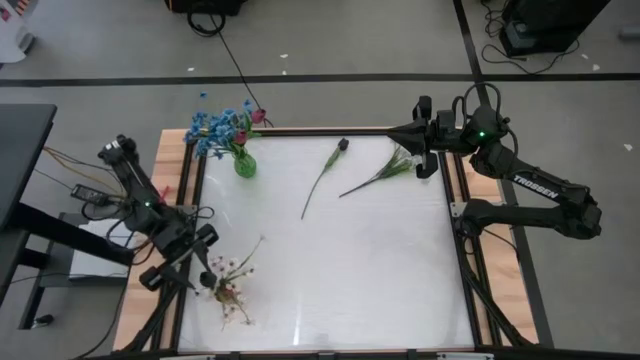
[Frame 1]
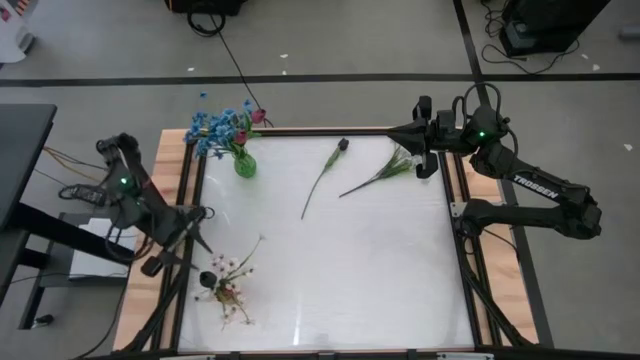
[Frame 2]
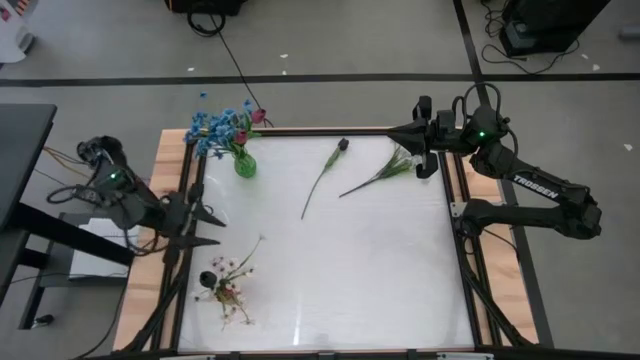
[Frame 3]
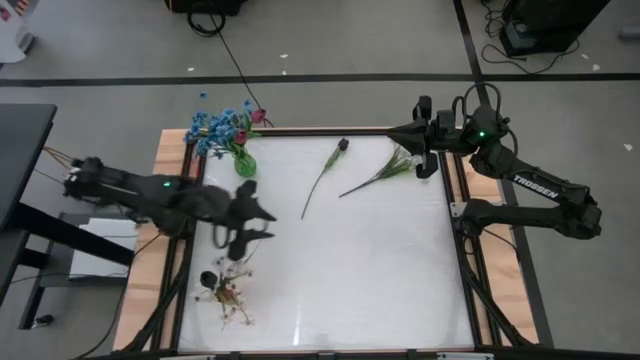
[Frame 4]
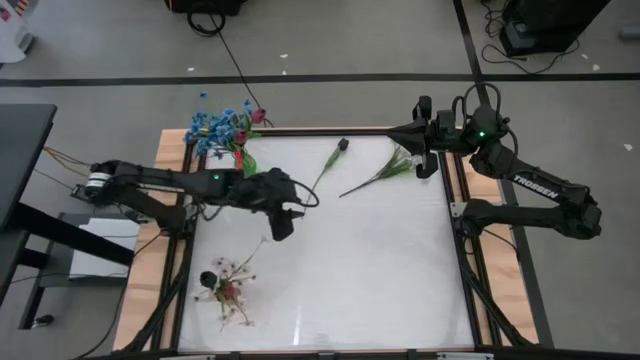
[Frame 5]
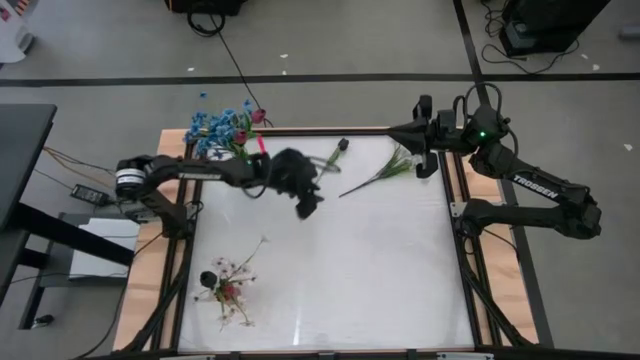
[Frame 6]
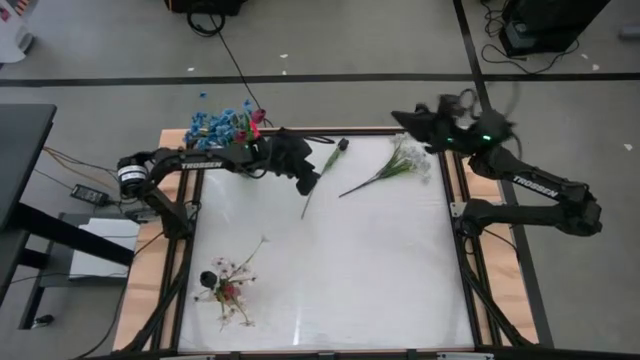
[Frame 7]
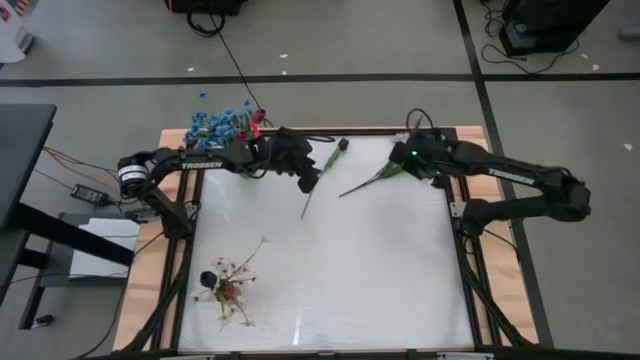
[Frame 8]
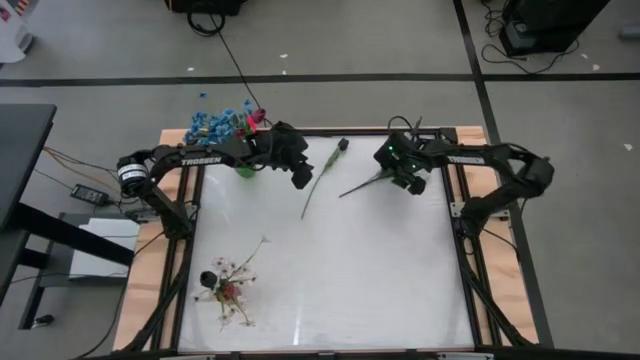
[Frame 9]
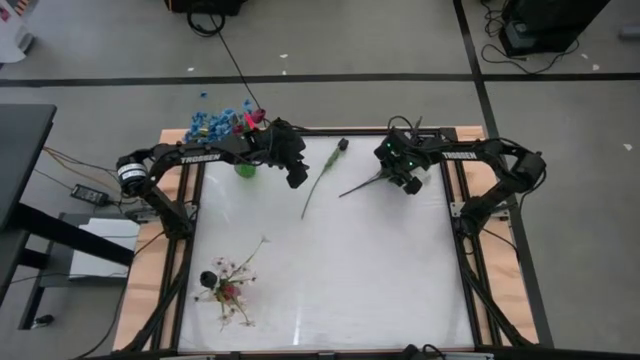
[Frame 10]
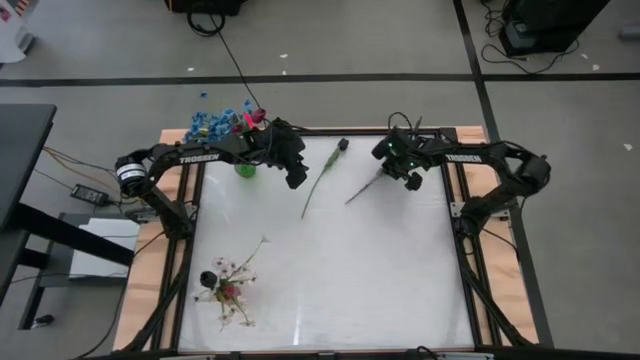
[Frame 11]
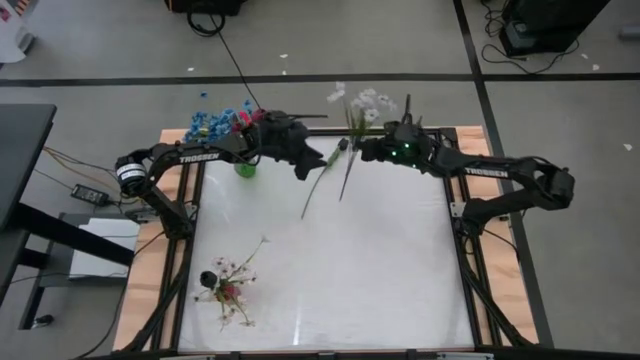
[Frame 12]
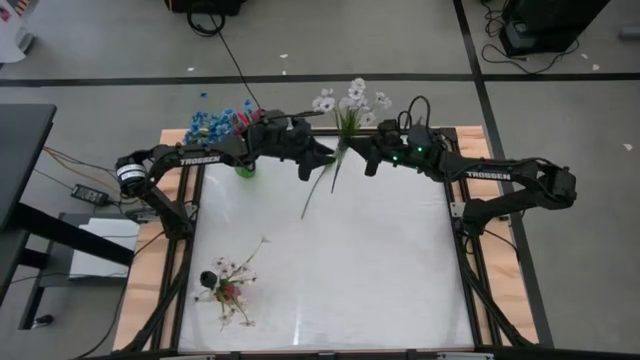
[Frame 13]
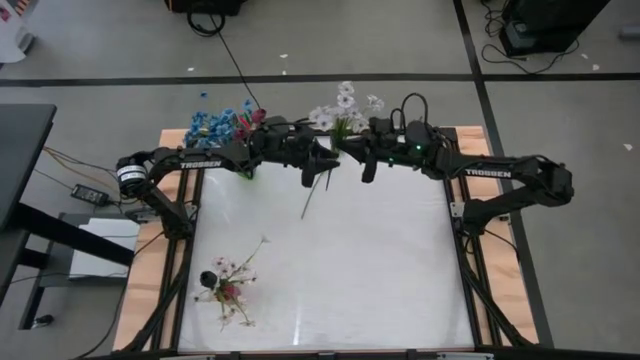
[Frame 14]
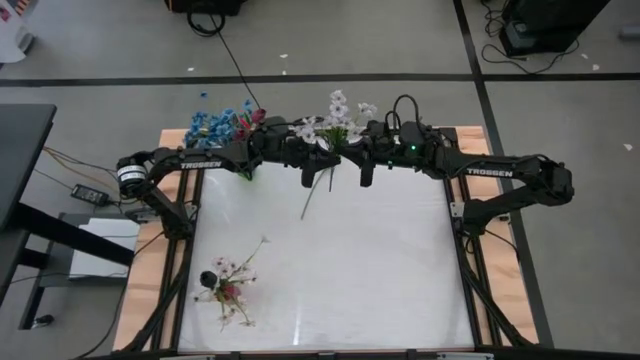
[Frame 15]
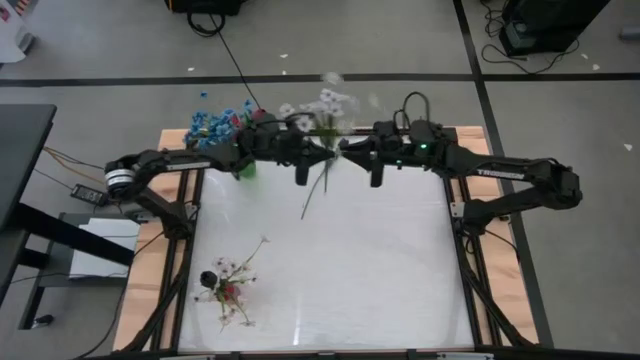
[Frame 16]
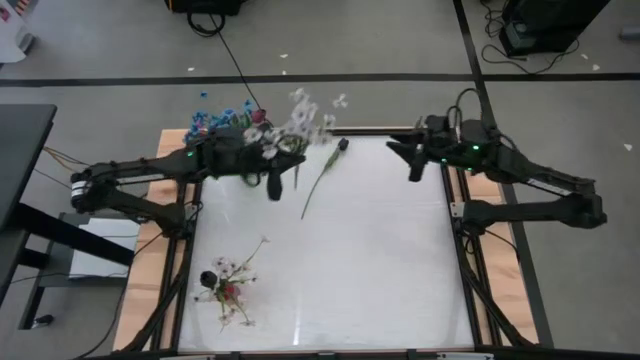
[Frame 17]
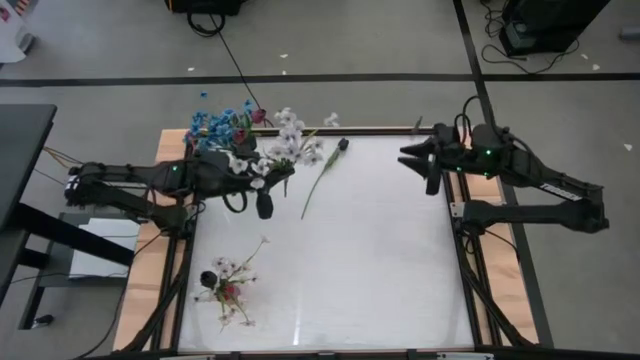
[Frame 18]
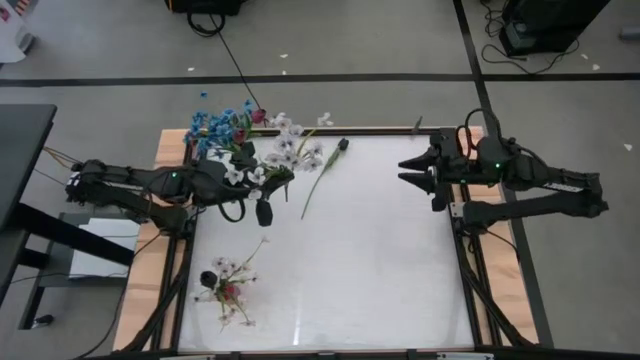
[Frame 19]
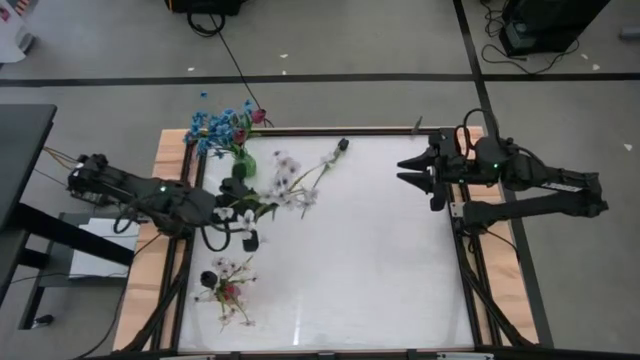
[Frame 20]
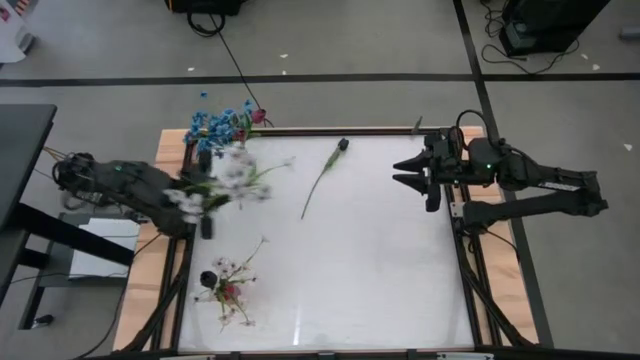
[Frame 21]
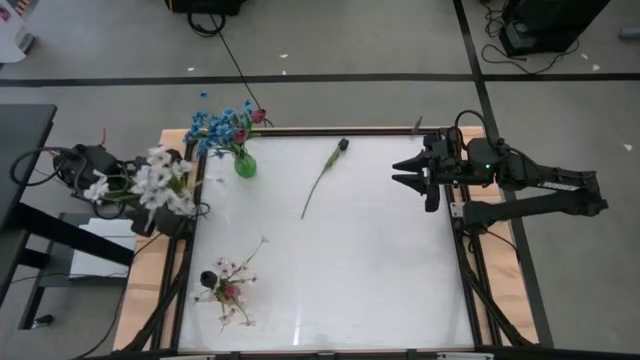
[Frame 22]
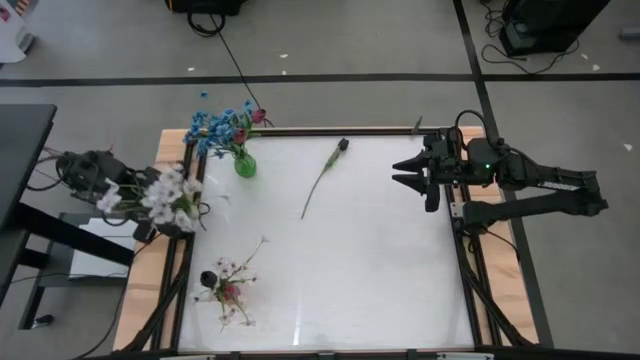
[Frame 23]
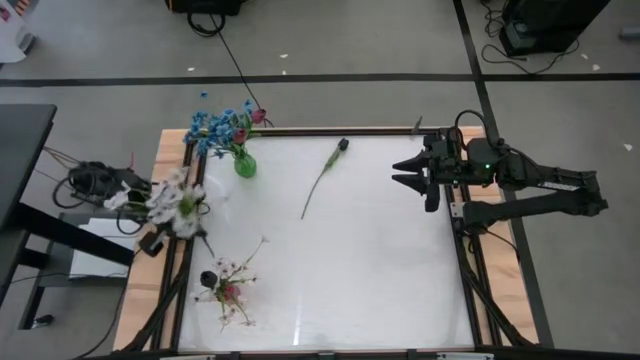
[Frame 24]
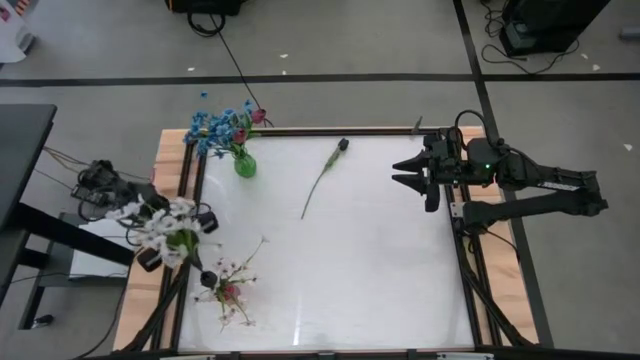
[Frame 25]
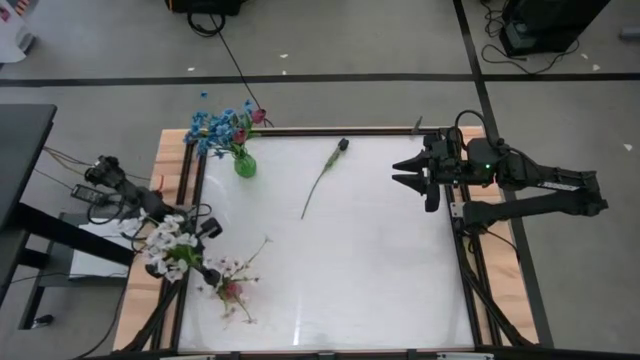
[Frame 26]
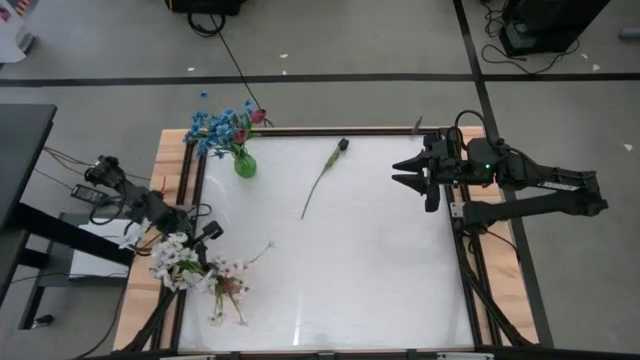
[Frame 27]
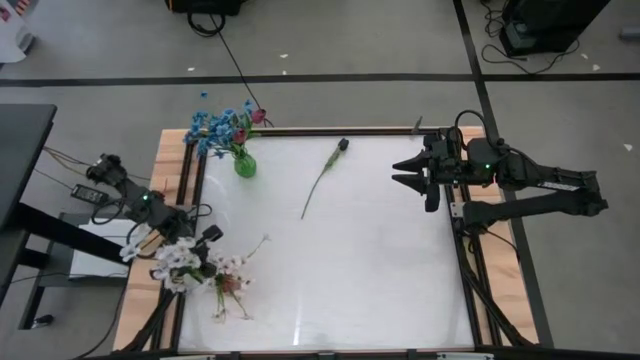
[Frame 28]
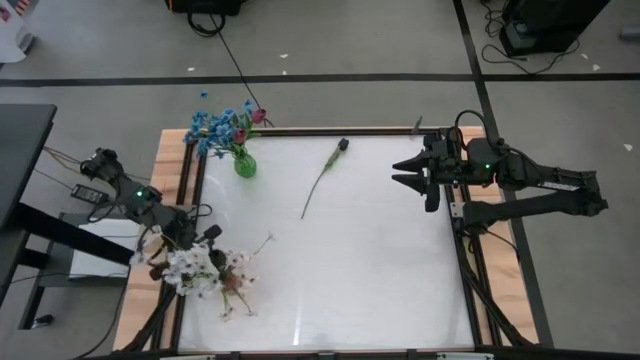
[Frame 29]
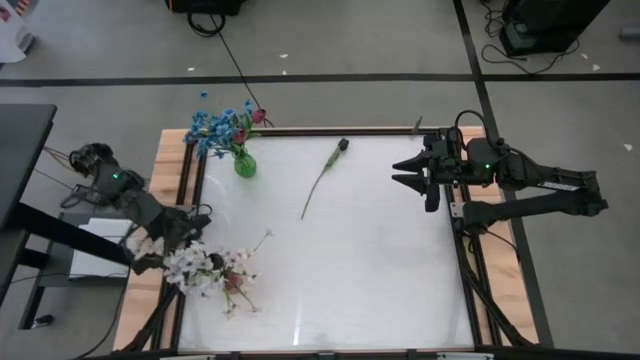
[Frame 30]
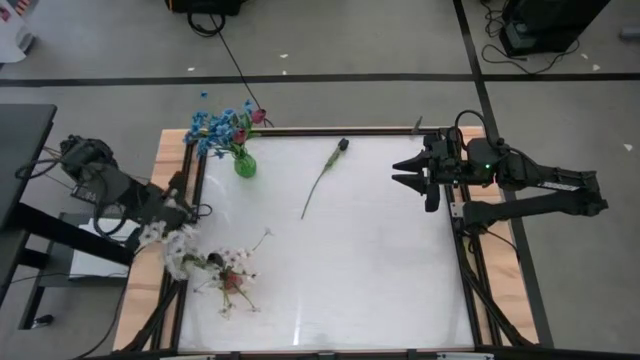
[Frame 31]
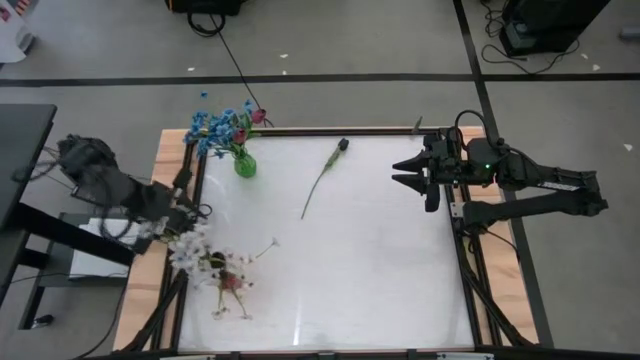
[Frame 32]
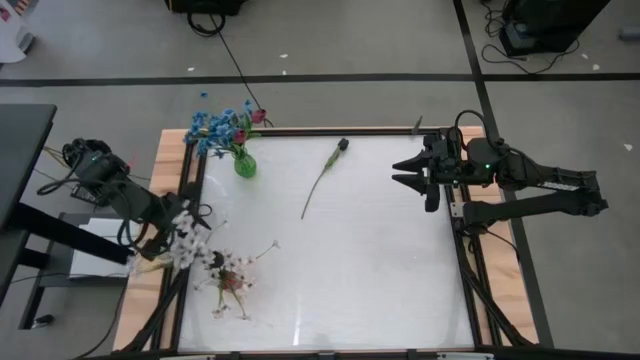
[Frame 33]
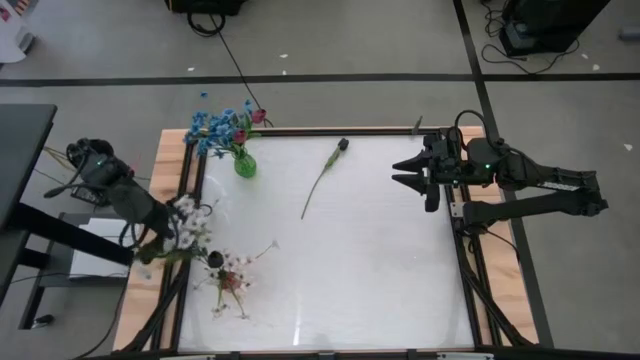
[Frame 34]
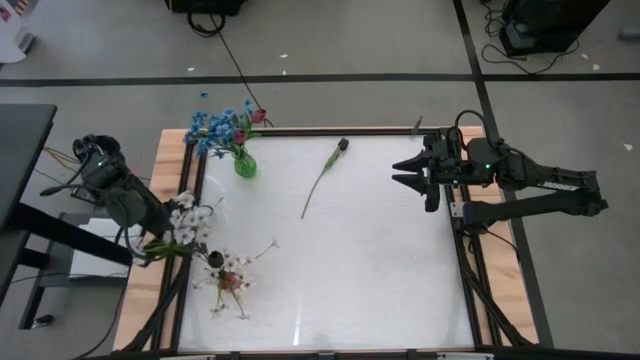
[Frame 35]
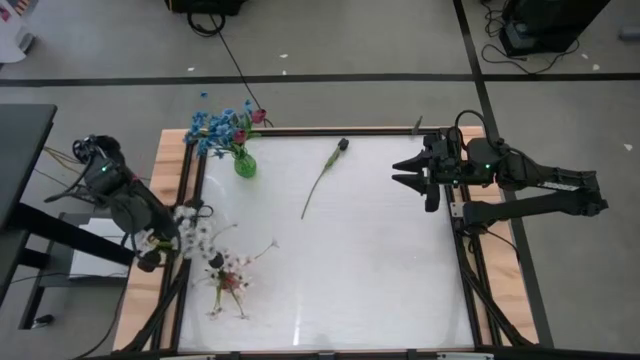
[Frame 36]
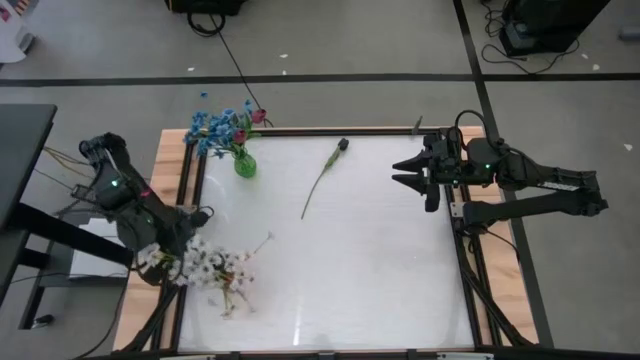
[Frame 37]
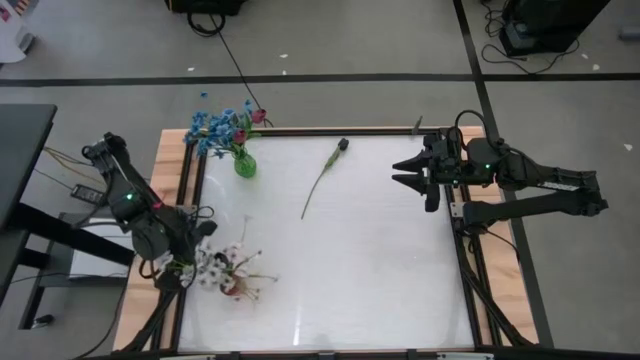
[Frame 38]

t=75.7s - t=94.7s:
Task: Sort flowers into vase by color
Put the white flower into the red vase

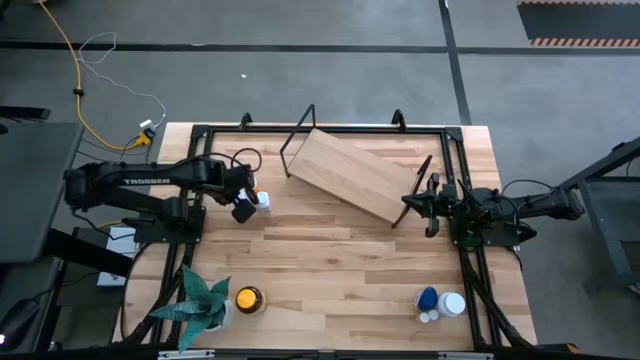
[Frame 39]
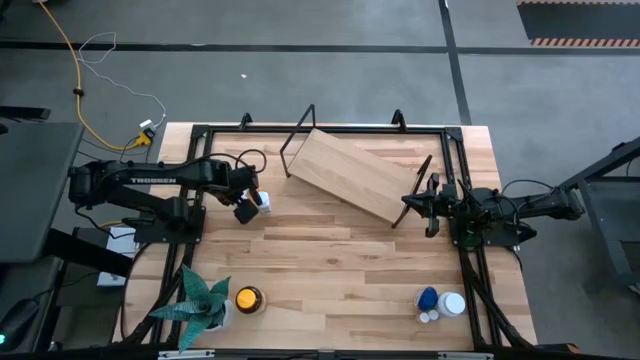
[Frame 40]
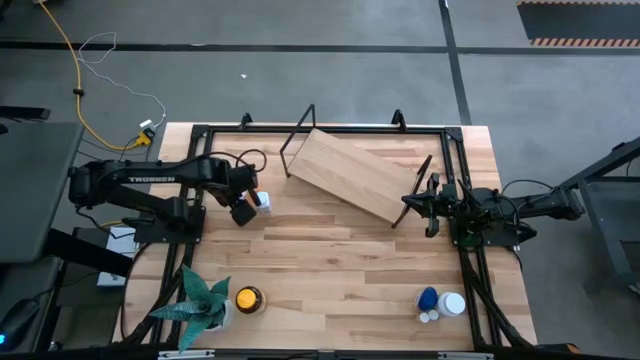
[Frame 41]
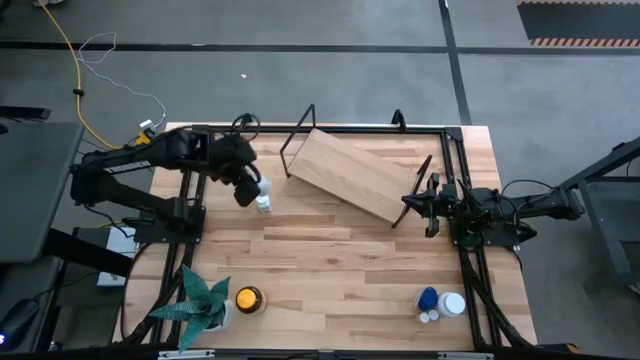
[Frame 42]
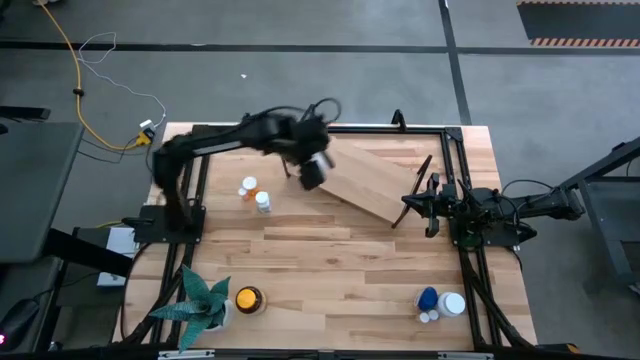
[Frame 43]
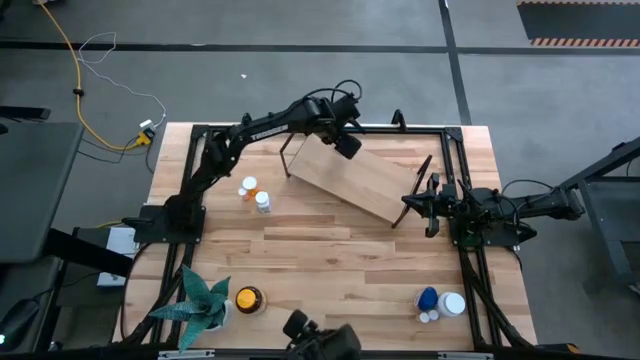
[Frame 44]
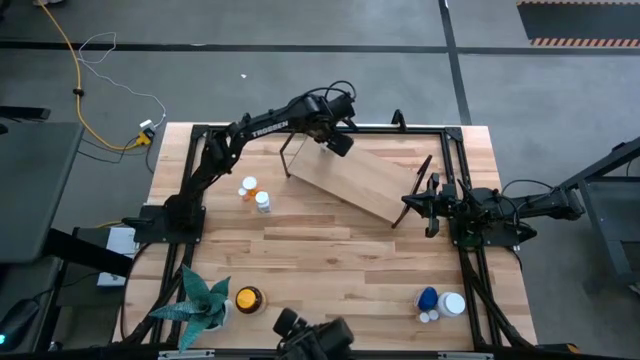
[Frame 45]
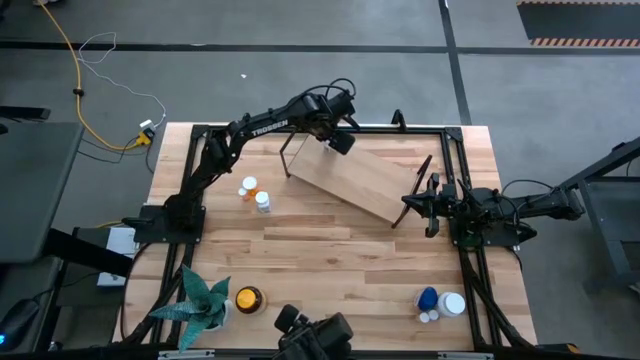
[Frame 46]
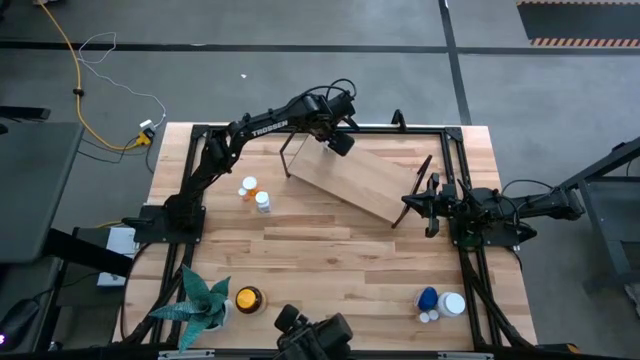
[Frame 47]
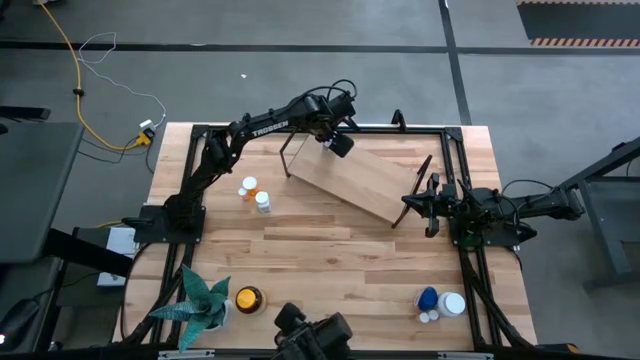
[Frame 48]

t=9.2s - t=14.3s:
Task: Pick and place medicine bottles onto shelf by color
Put the top left white pill bottle on the shelf
